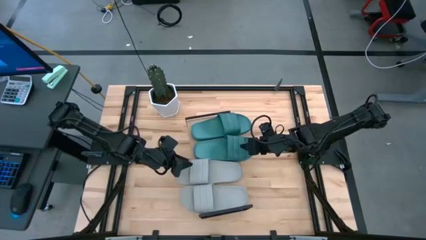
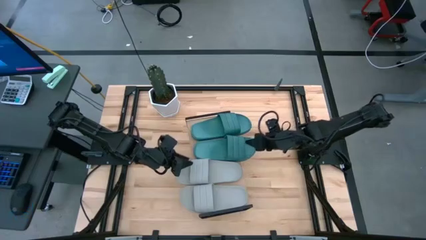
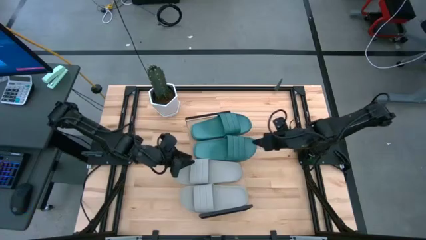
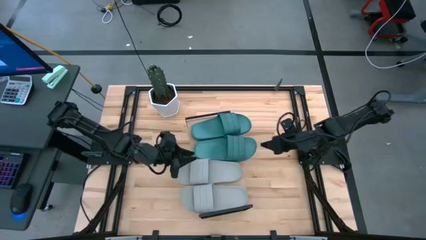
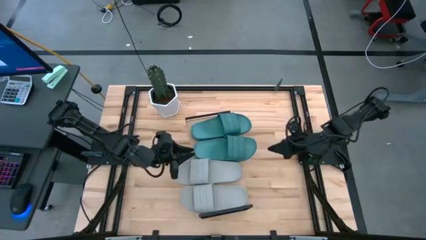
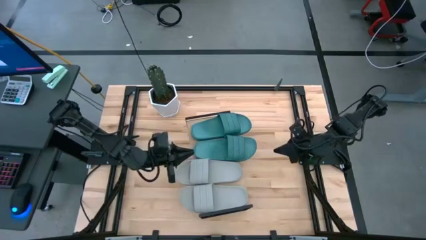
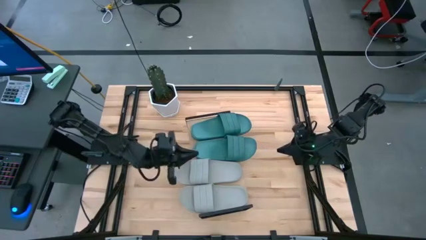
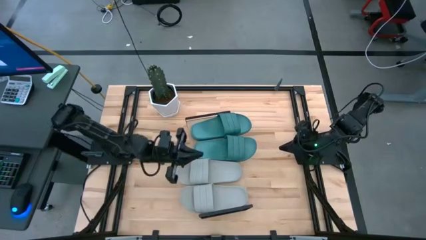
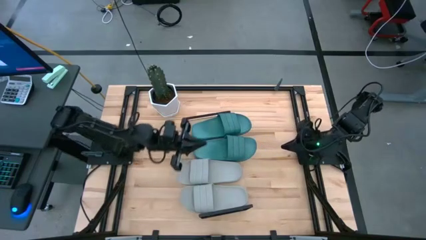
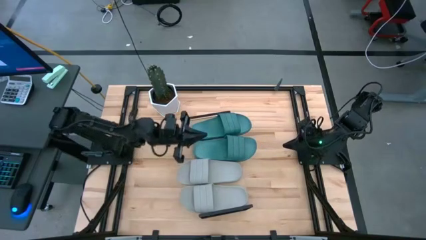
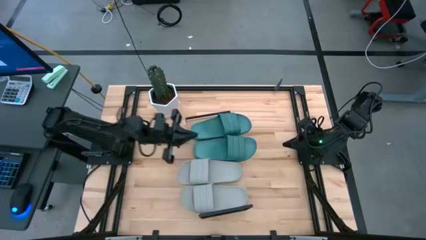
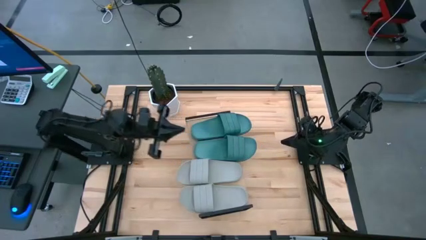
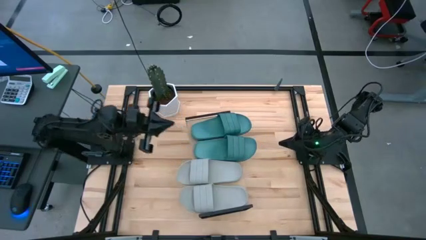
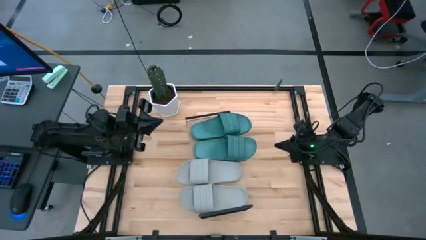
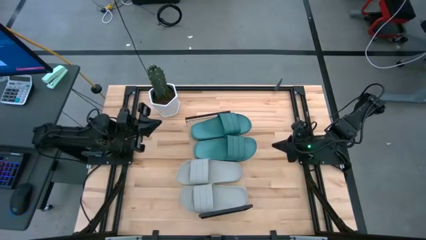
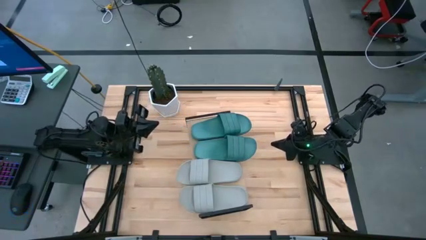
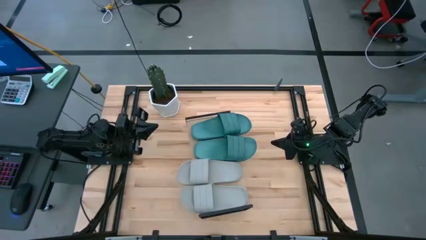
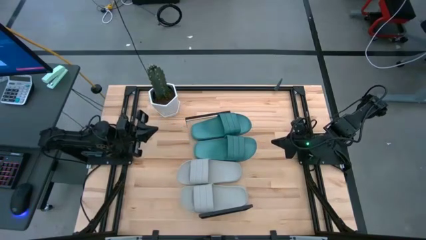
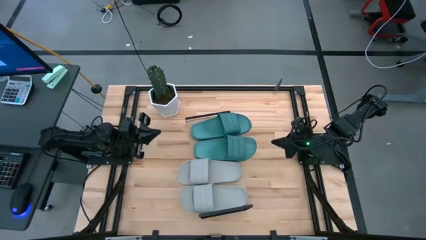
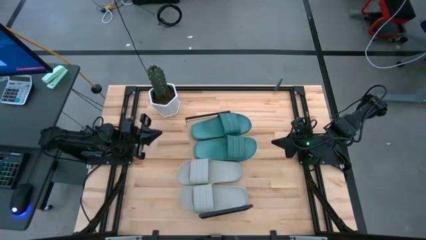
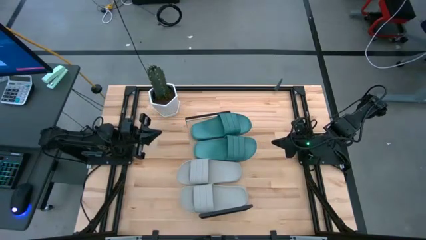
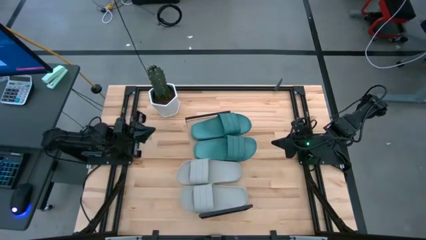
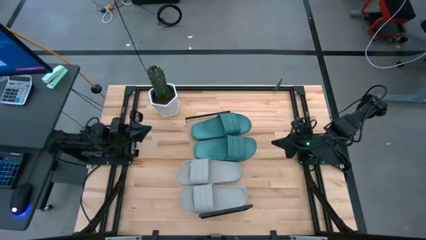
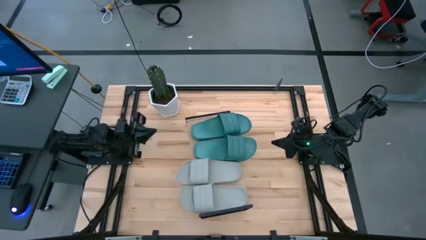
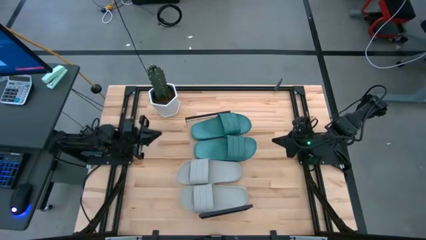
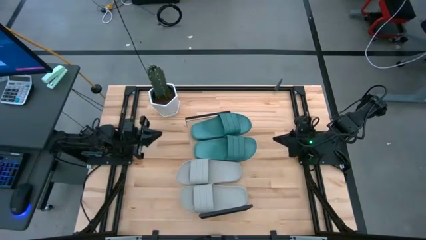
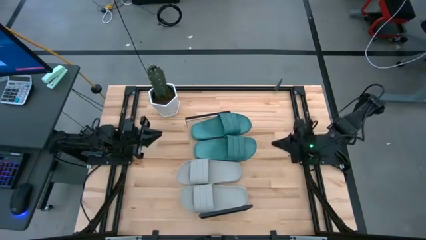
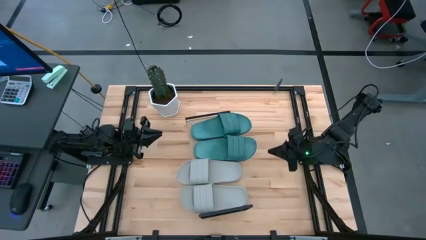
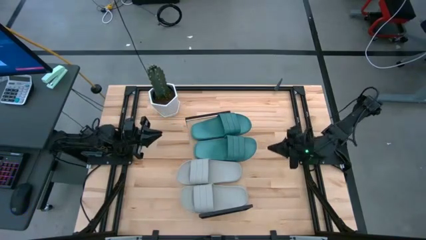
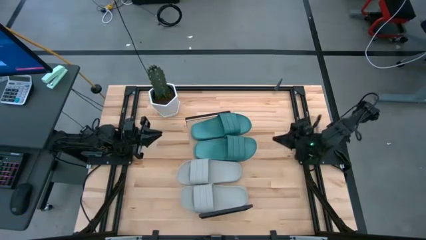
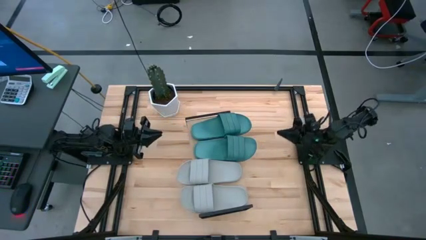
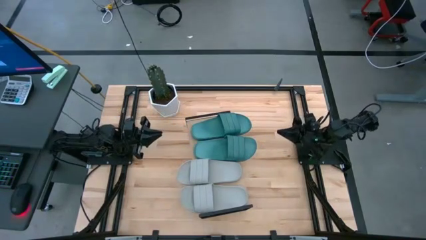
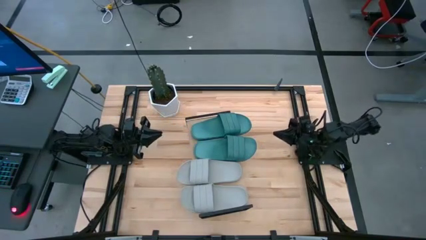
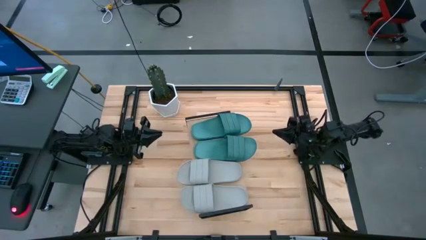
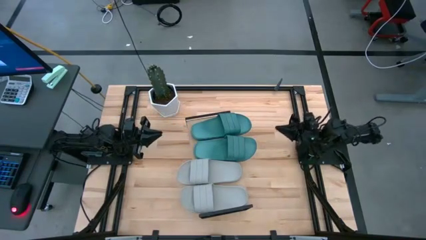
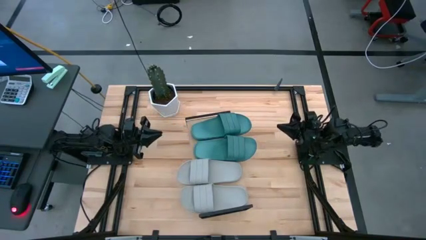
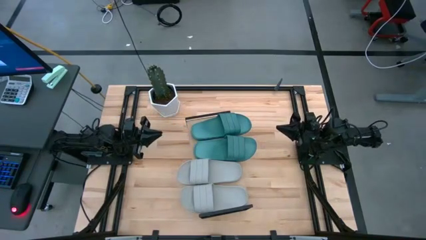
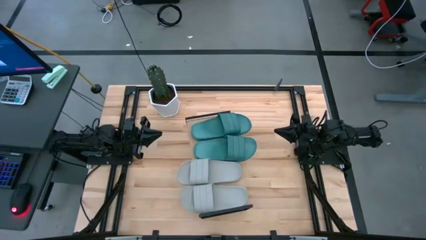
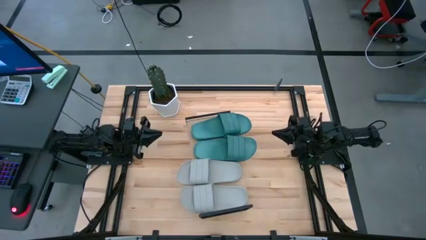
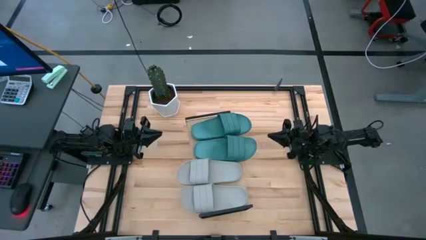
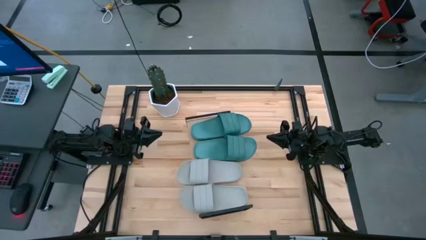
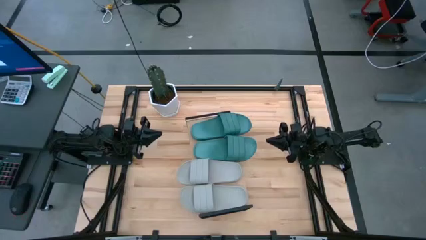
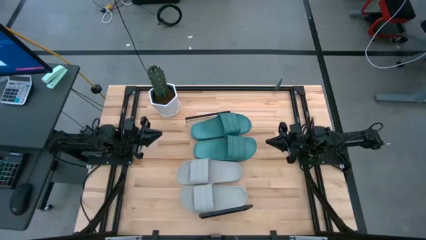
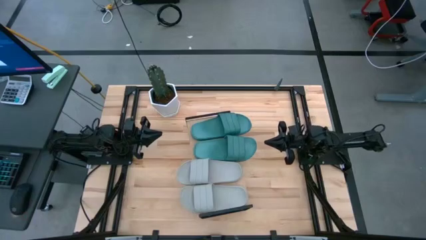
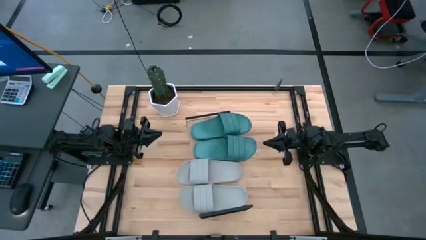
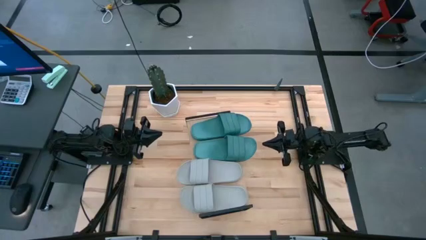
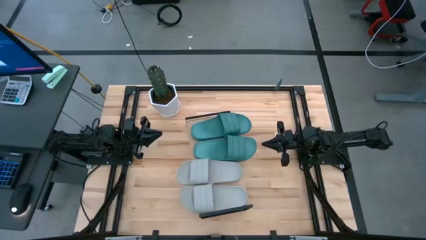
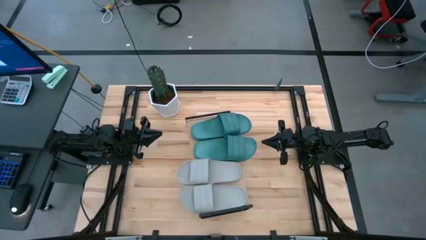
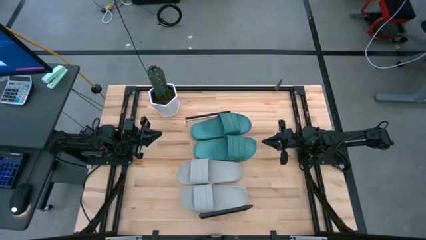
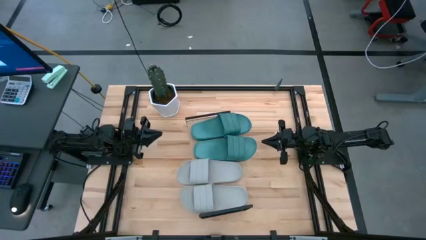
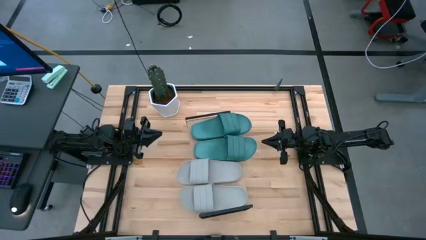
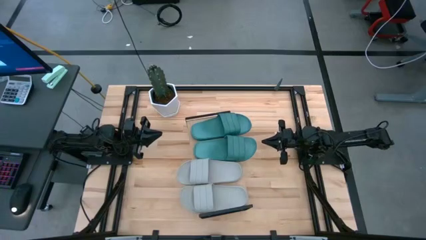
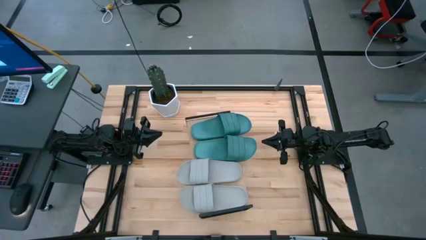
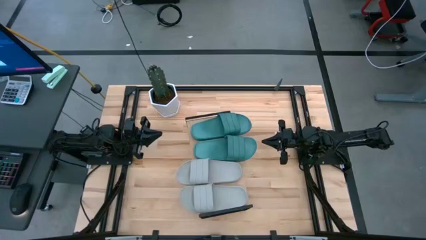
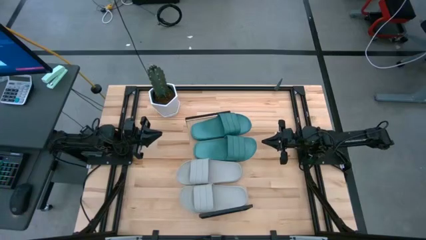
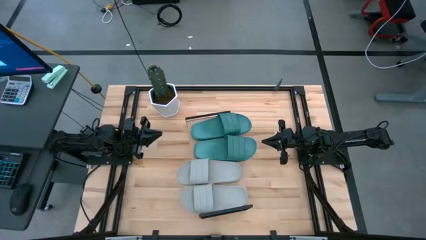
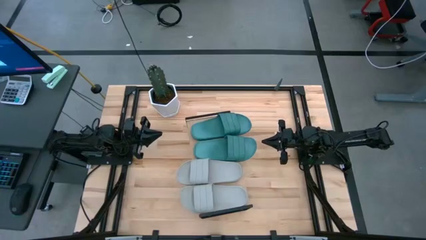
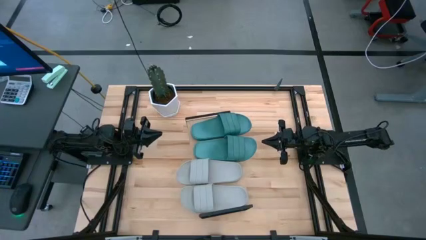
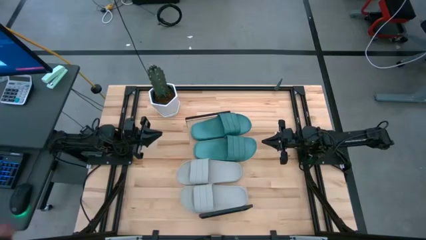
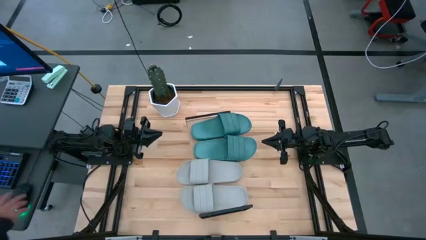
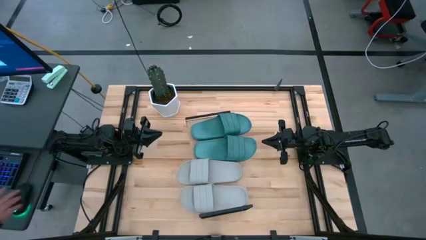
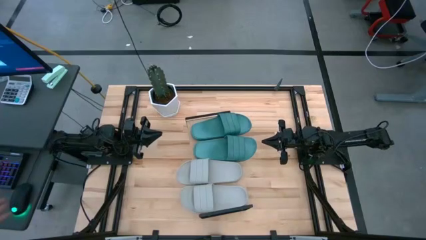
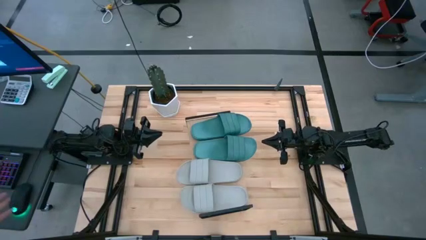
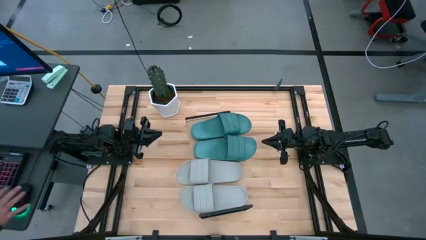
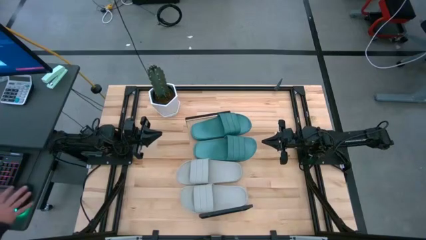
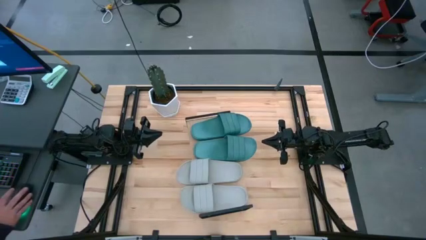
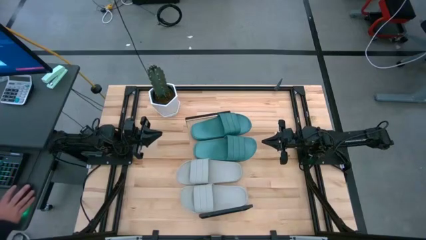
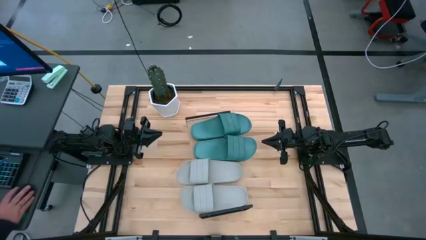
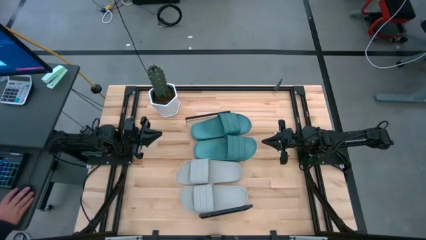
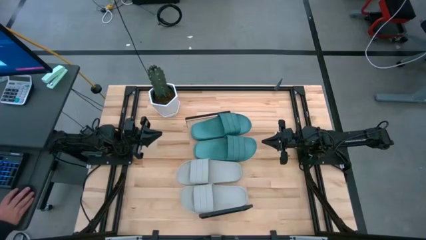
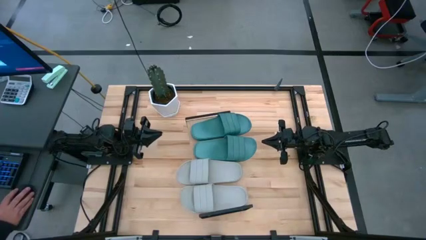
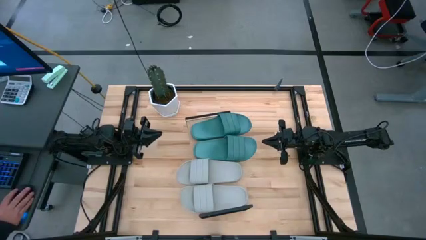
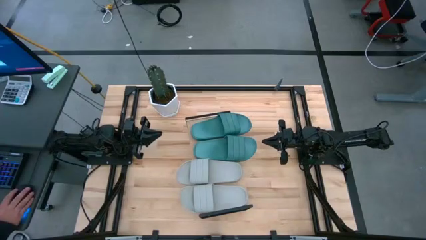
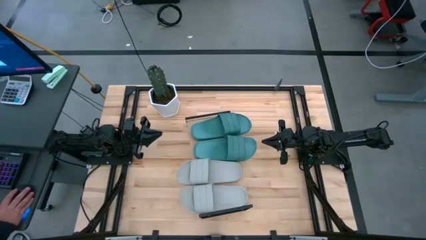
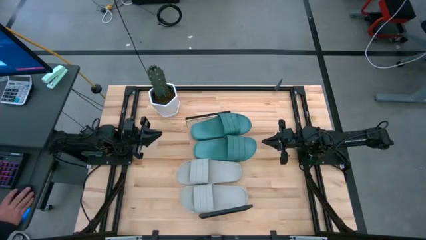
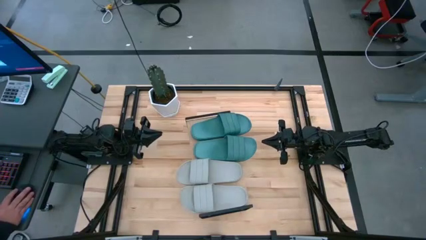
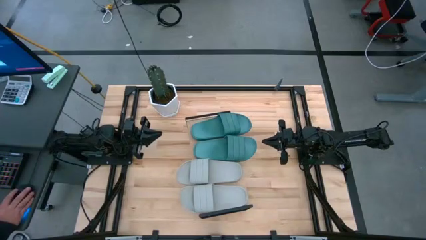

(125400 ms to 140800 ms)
Task: Pick and place slides into the shelf
Return to Home Position

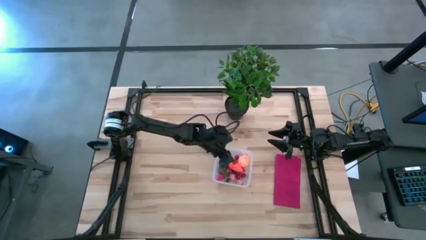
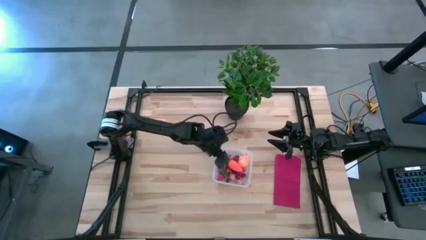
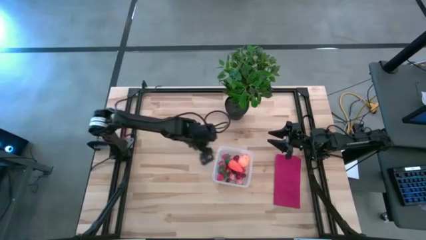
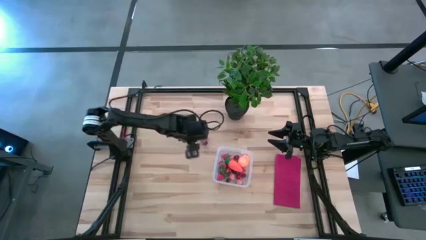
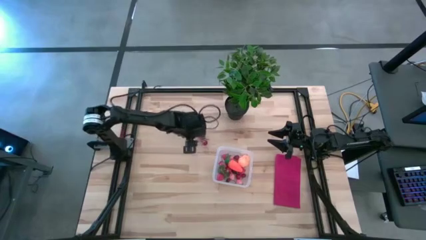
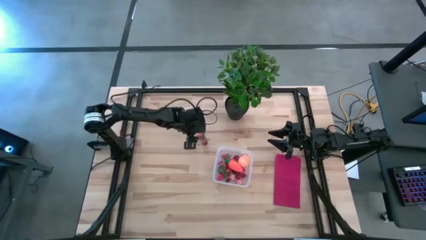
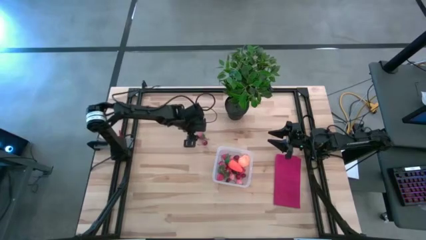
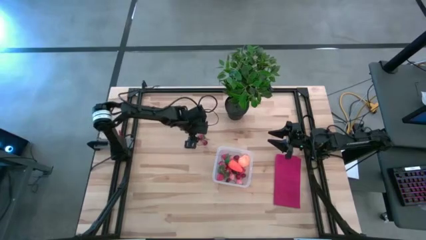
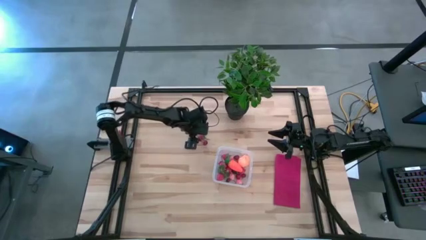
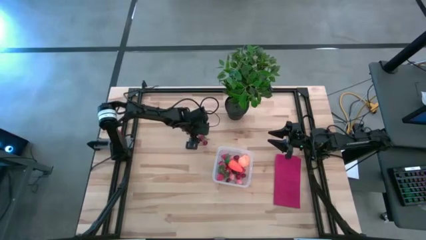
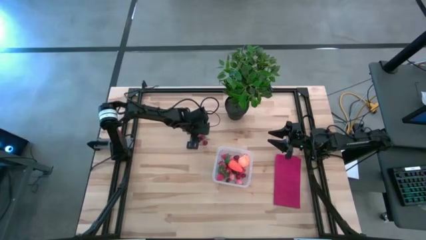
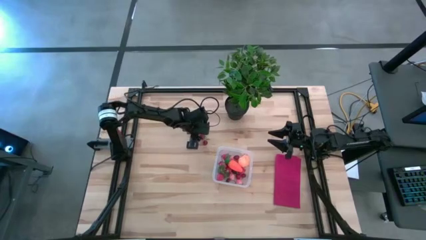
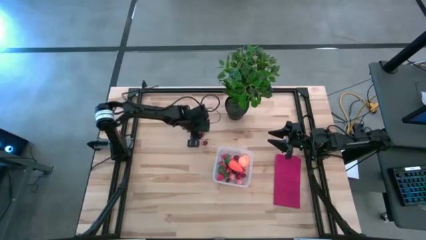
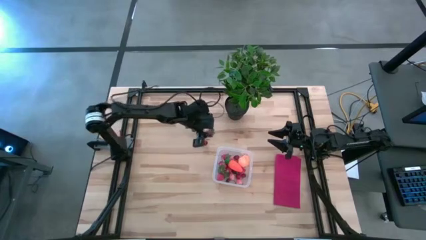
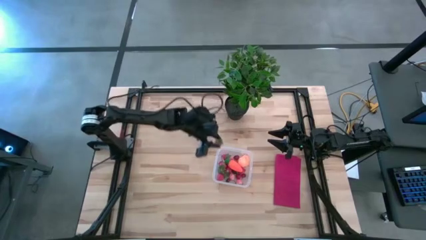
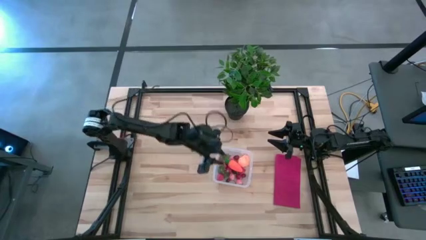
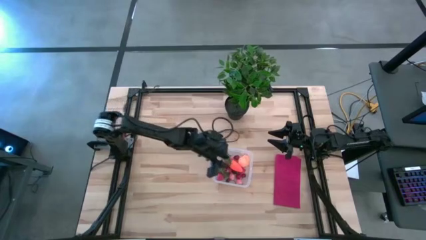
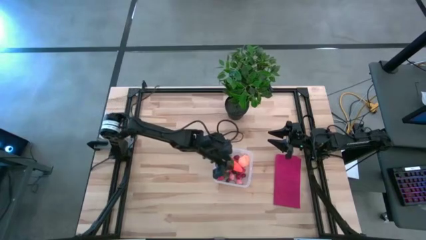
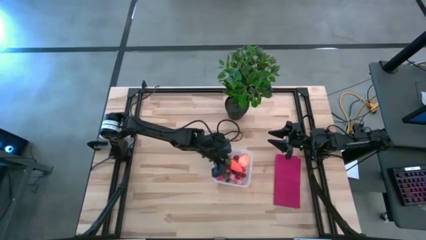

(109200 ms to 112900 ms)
Task: Pick and placing Produce into tupperware
Put the red strawberry into the transparent bin
